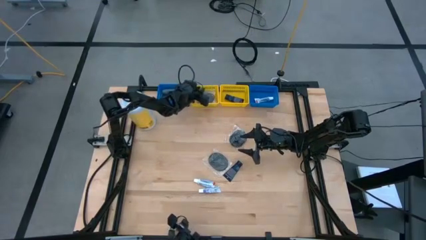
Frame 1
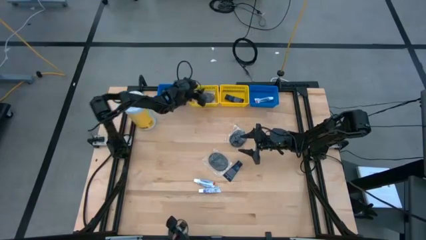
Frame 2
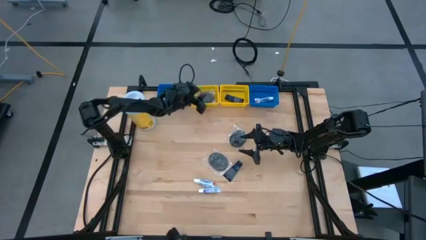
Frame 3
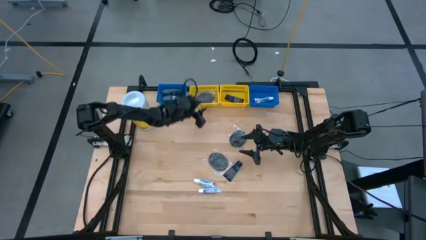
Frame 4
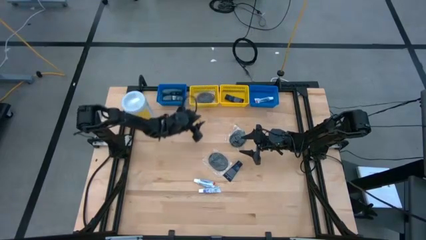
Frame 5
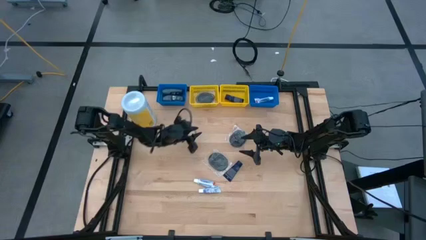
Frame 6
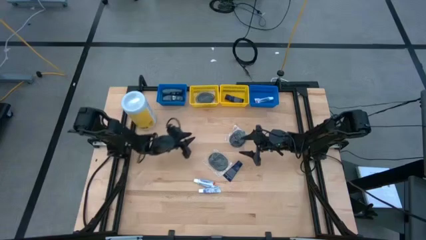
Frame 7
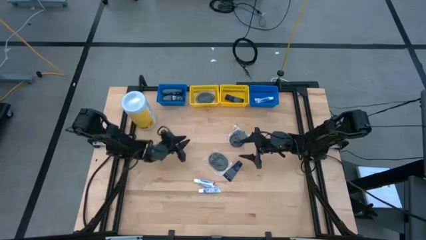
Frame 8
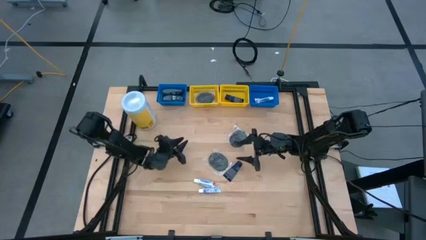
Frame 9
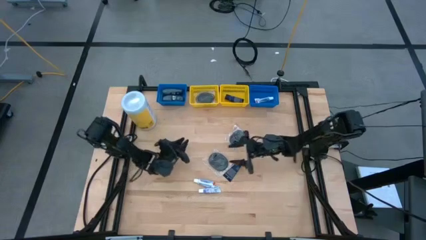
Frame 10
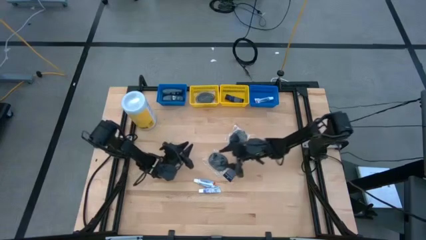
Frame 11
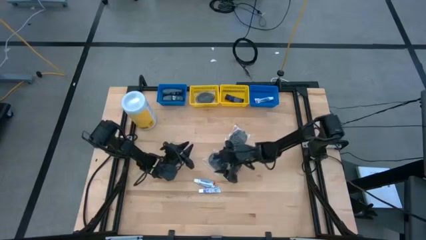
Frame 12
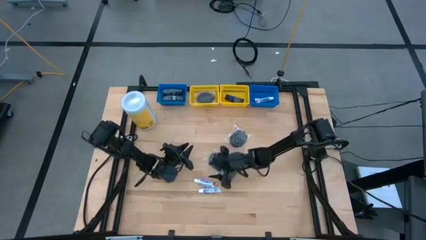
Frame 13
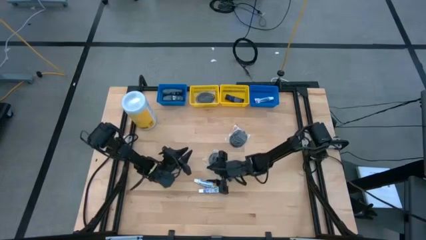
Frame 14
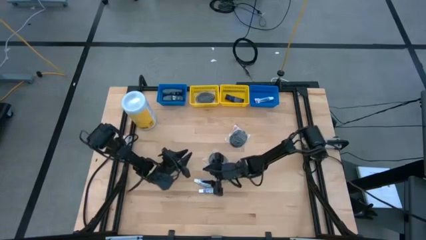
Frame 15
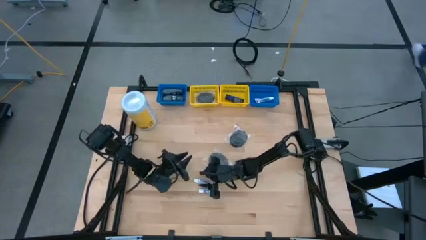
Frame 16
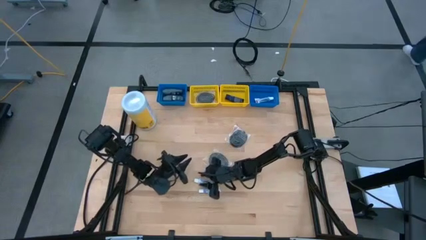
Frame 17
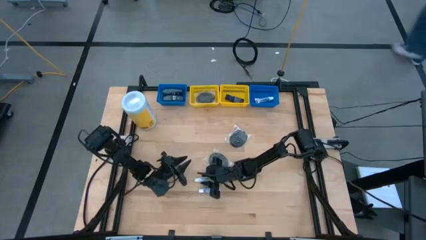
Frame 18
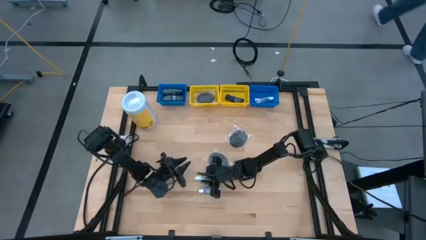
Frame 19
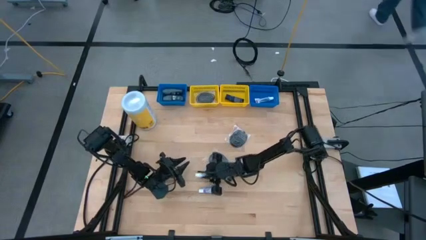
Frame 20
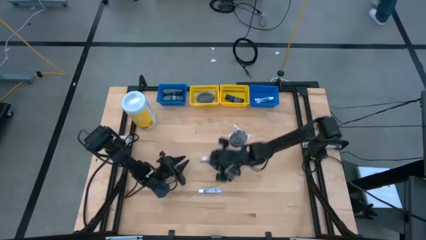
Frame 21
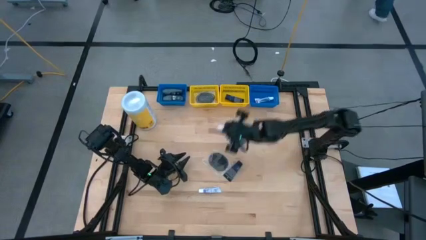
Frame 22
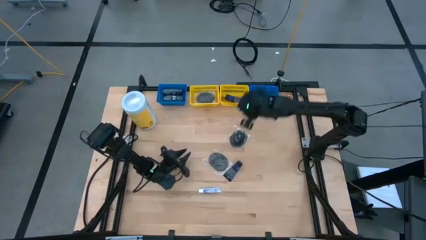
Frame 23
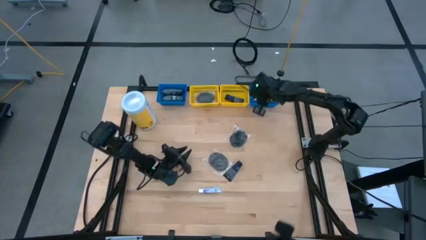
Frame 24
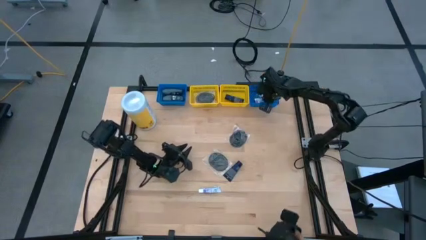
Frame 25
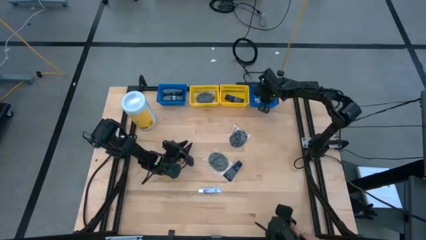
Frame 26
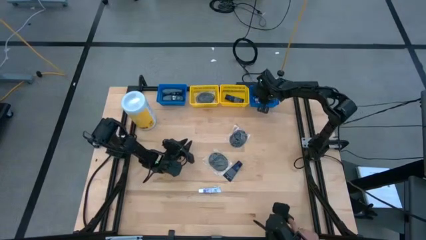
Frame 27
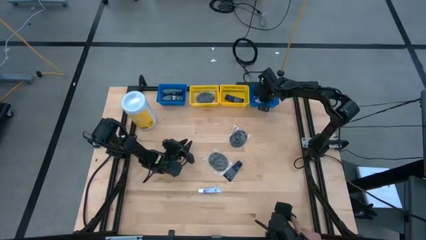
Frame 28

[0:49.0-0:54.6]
Task: Pick & Place Travel size toiletries
Put the toothpaste into the right blue bin

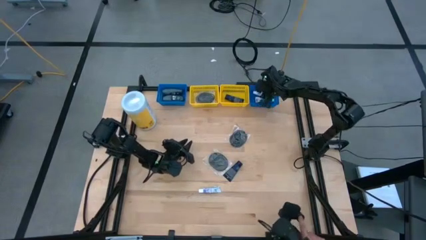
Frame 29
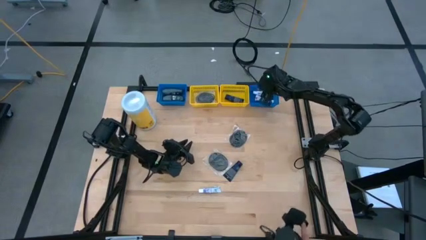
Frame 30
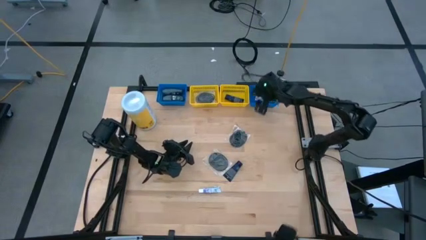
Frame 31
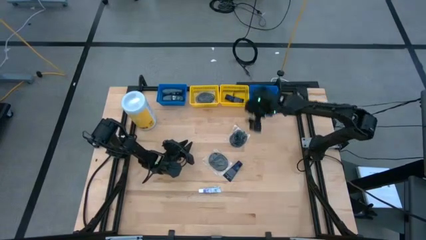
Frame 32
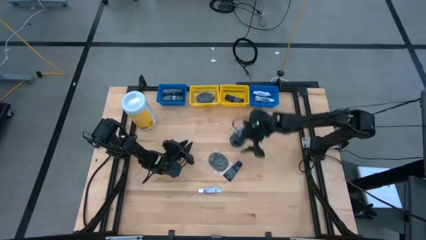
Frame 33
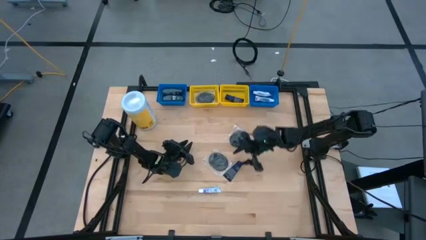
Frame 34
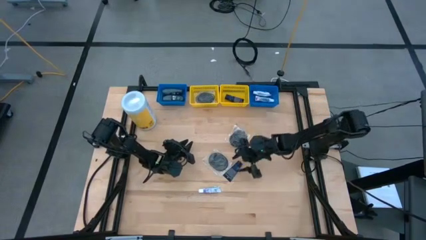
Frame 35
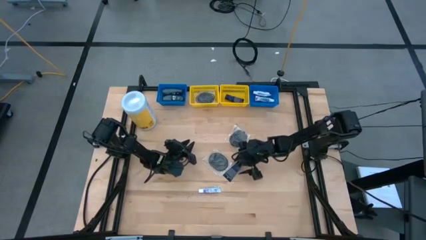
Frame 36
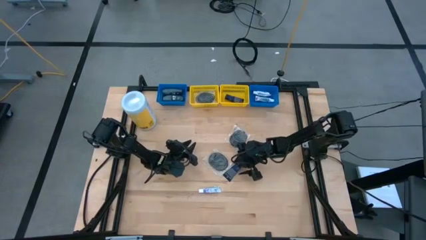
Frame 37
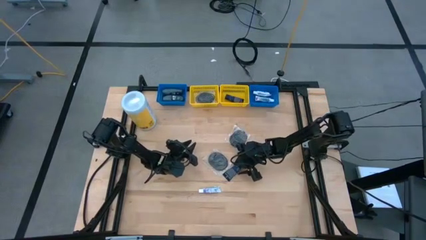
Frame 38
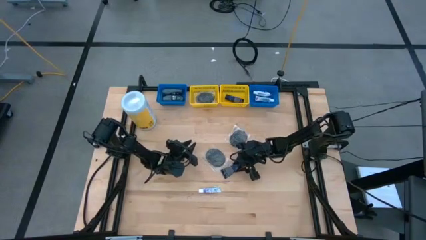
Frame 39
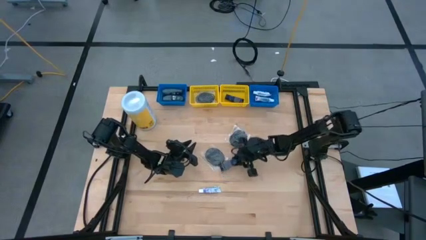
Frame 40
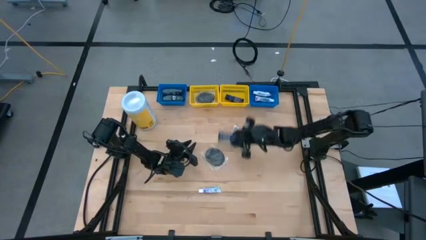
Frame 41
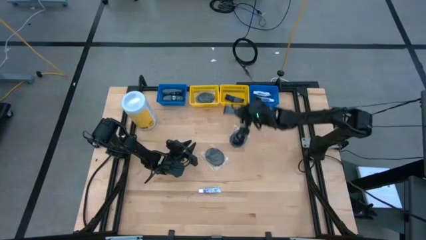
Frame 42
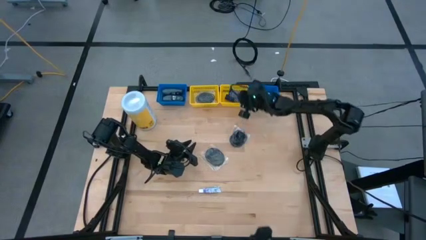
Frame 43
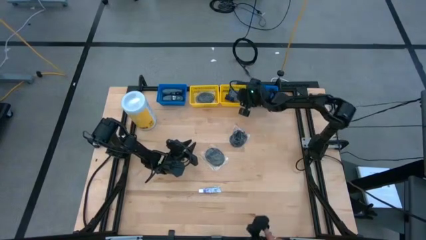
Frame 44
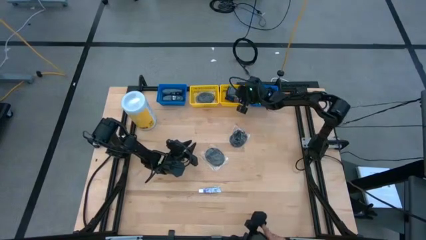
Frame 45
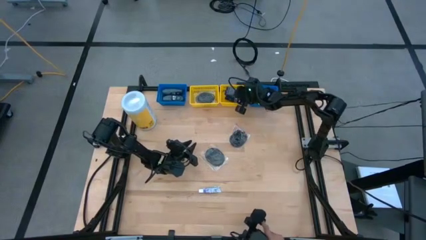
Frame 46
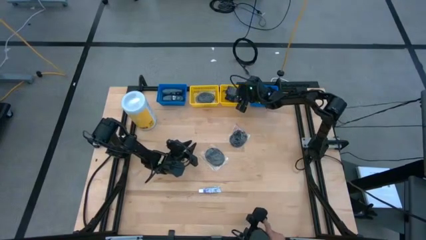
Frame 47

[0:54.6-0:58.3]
Put the shave cream into the right yellow bin

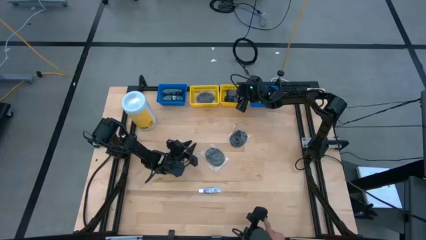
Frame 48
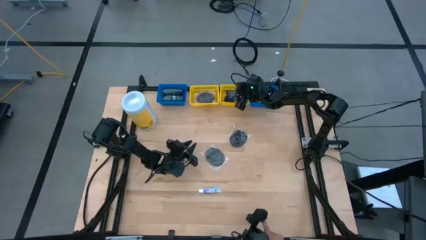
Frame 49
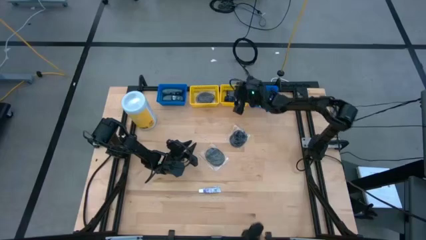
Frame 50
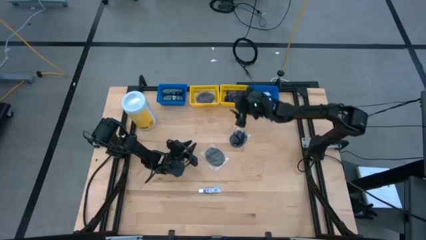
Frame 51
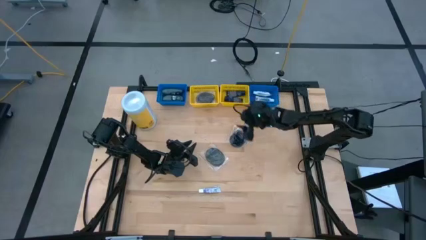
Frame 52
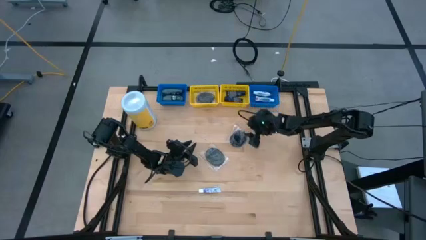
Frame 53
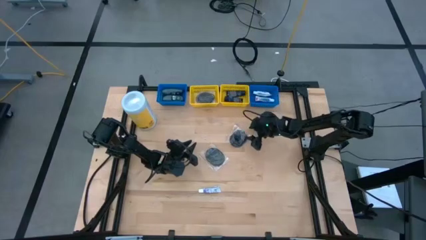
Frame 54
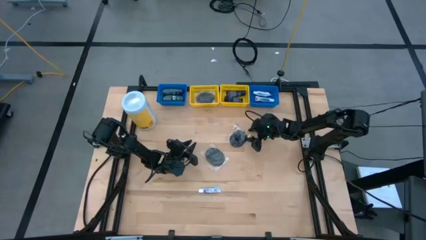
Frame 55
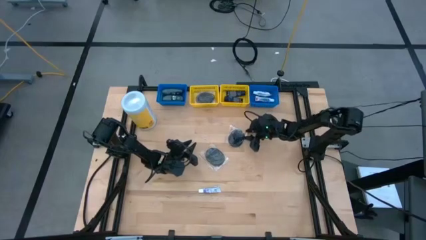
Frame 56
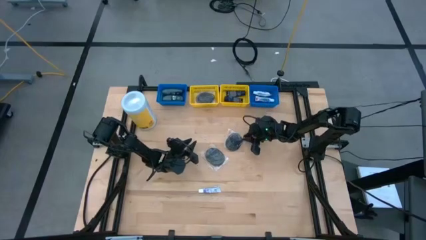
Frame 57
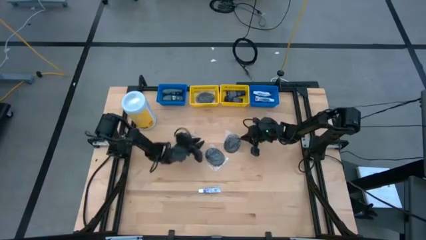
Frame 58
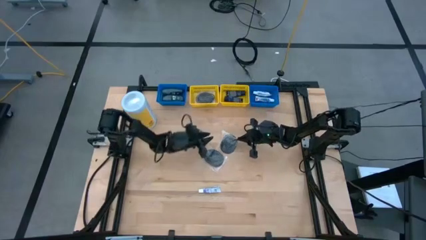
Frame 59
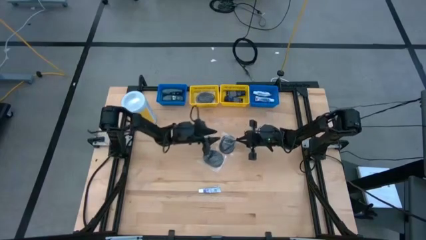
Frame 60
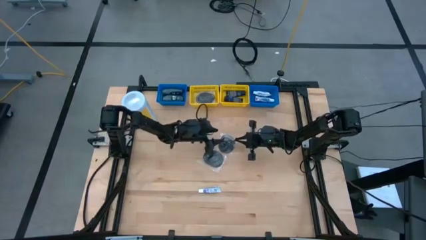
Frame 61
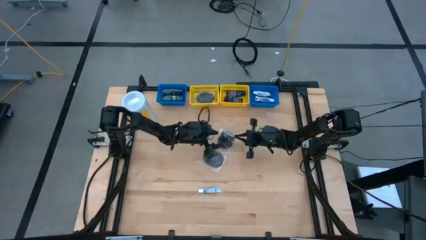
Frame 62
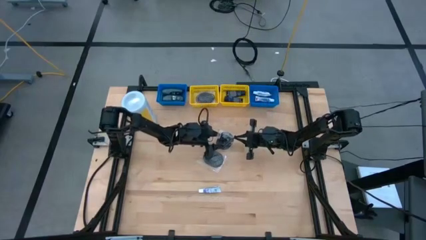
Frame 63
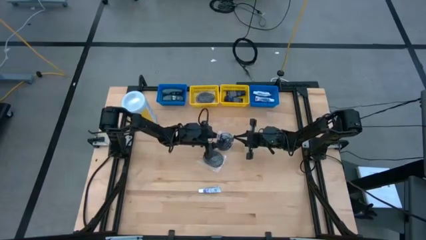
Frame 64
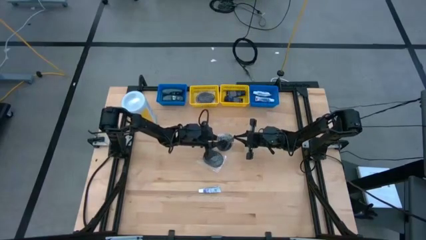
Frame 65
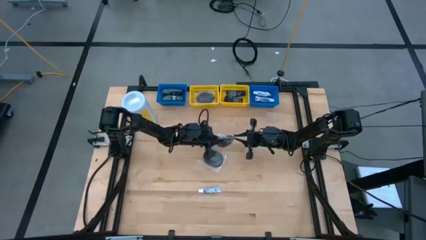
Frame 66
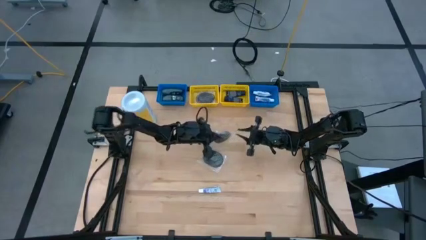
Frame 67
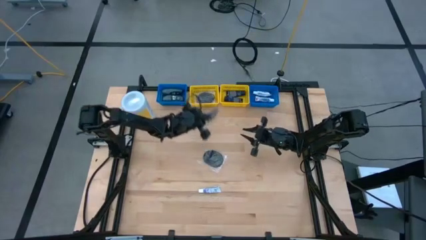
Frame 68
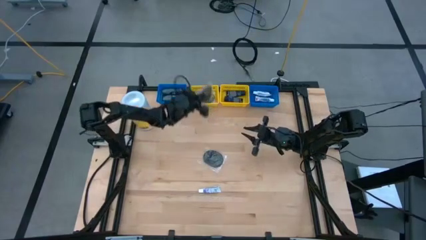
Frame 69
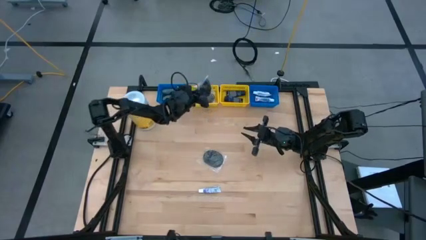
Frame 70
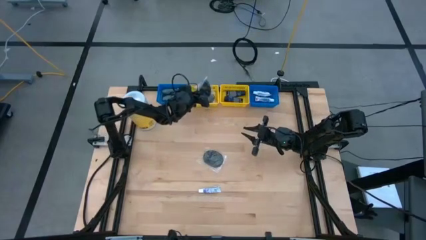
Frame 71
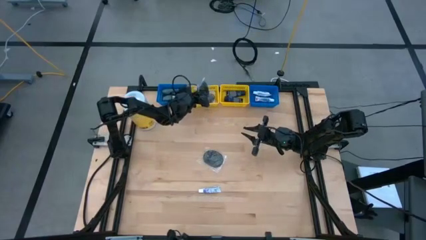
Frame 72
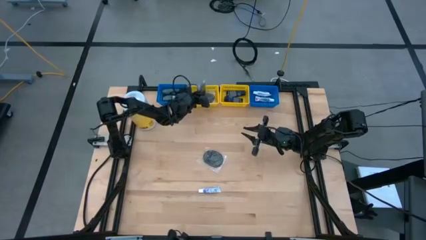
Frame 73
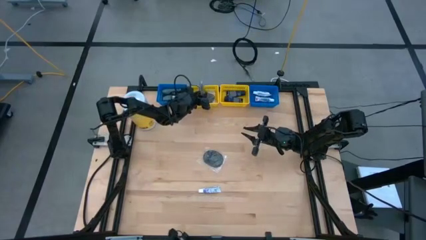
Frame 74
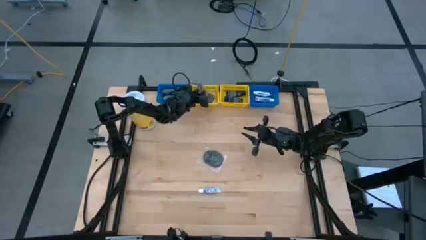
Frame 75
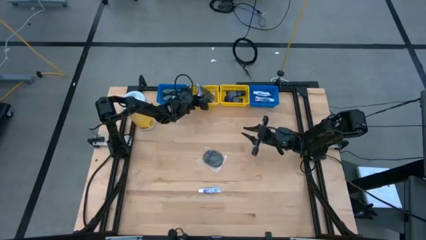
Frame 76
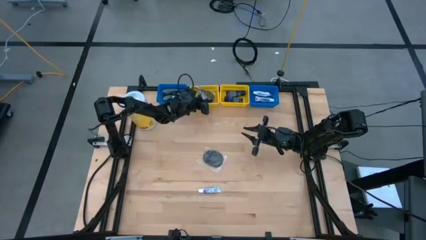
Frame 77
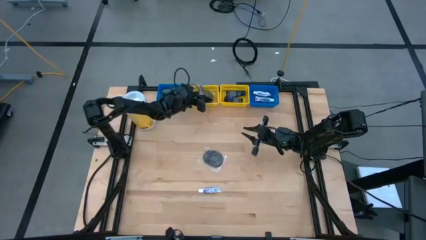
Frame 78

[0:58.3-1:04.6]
Put the hairbrush into the left yellow bin
